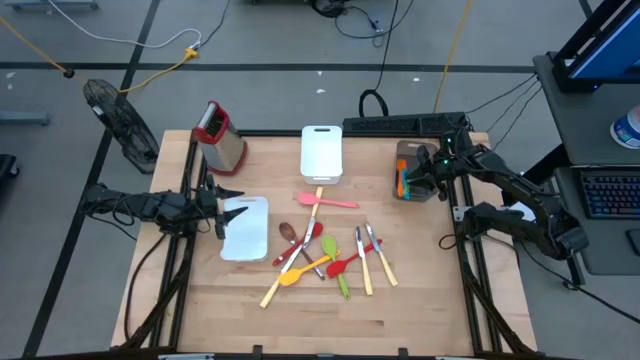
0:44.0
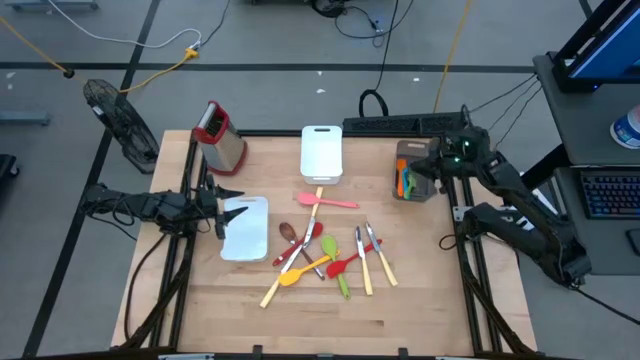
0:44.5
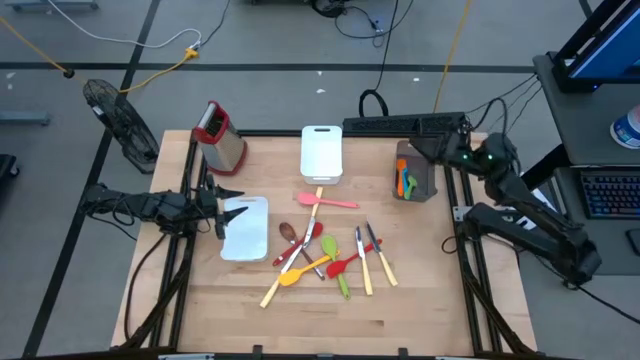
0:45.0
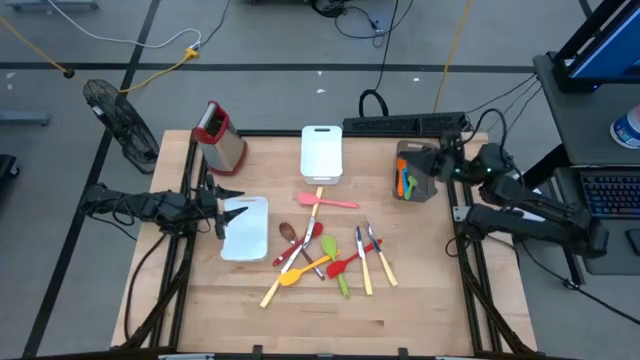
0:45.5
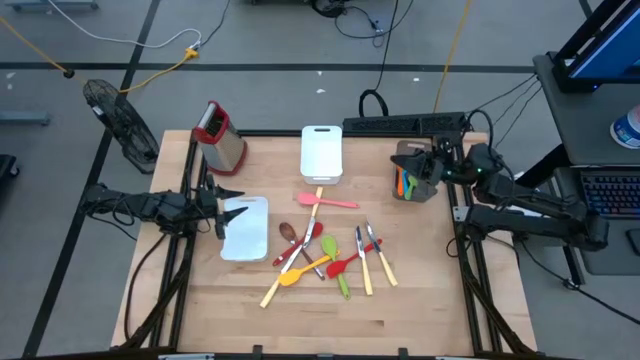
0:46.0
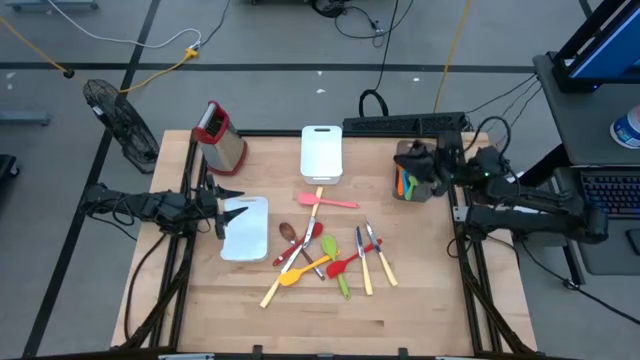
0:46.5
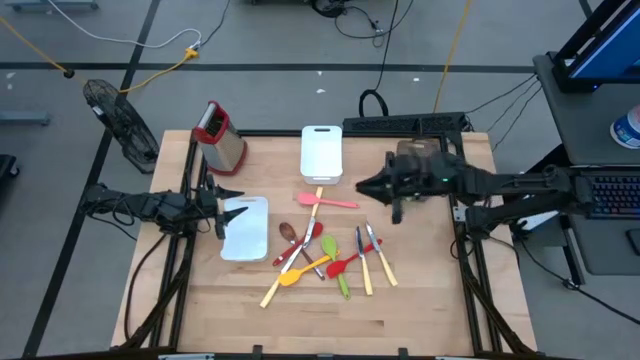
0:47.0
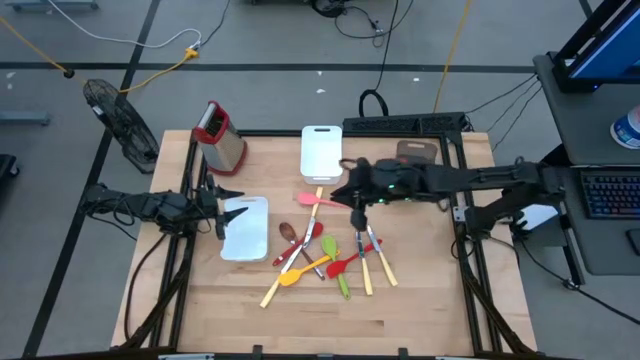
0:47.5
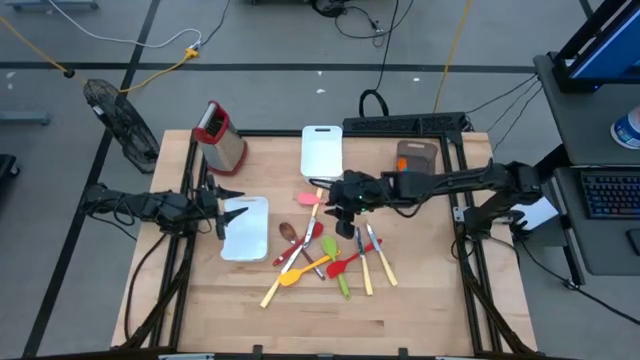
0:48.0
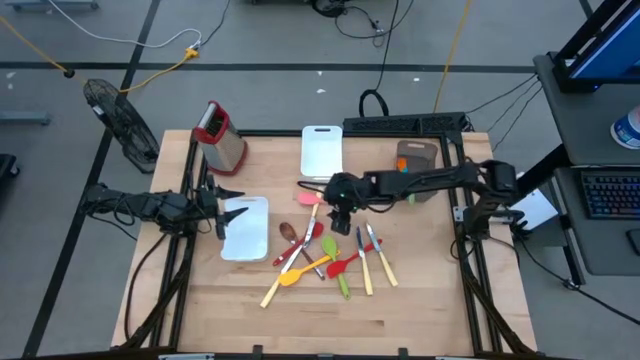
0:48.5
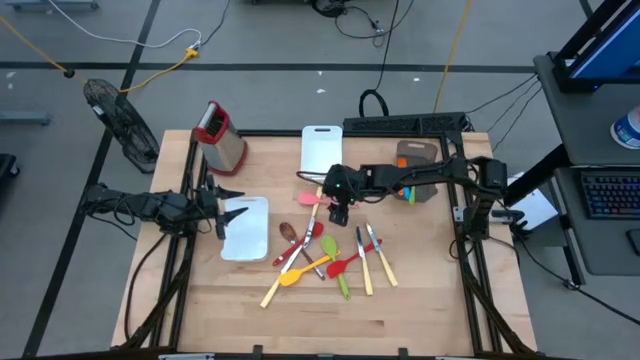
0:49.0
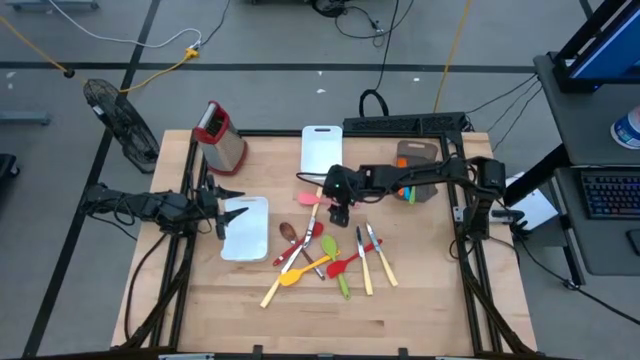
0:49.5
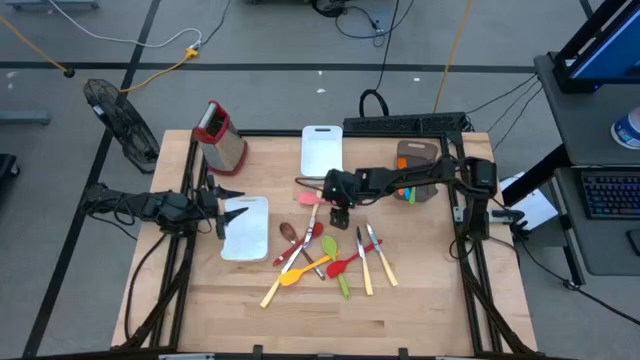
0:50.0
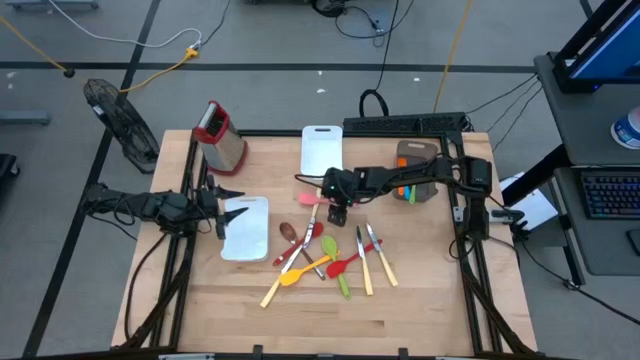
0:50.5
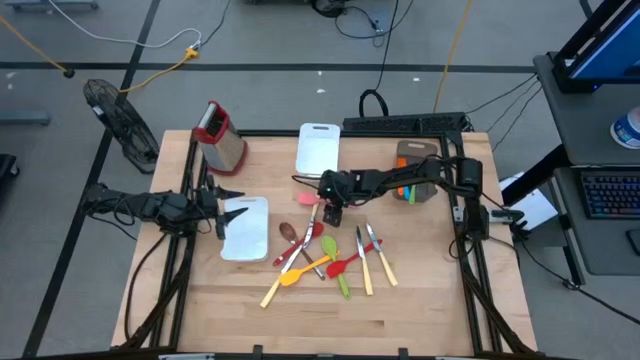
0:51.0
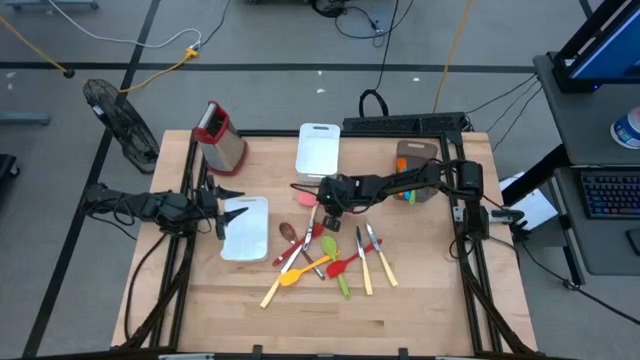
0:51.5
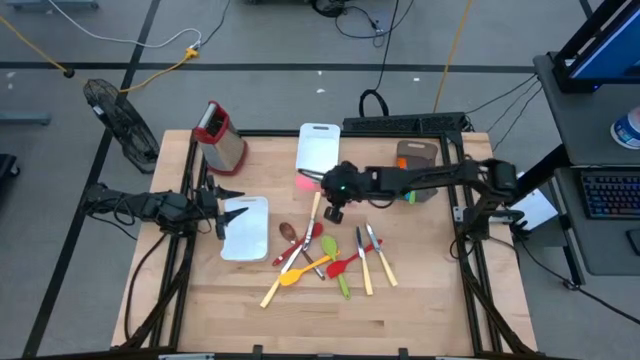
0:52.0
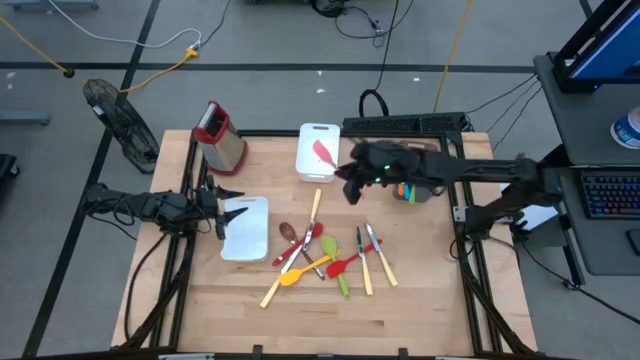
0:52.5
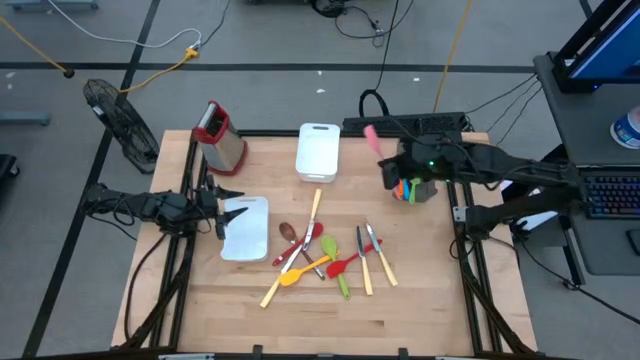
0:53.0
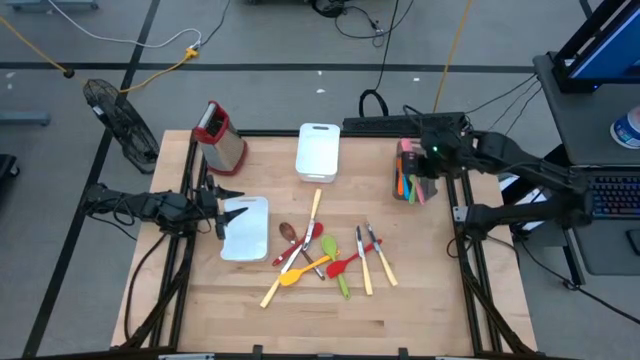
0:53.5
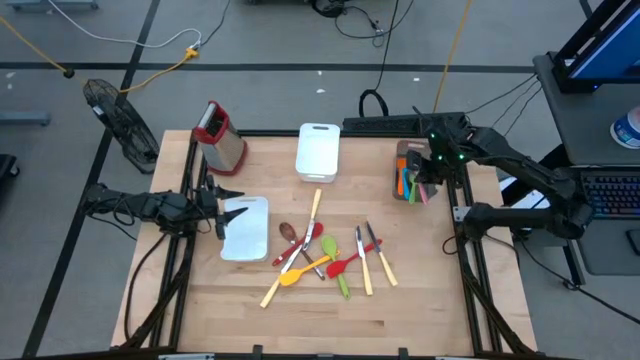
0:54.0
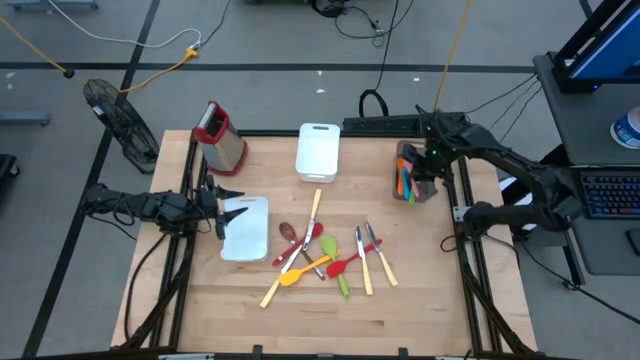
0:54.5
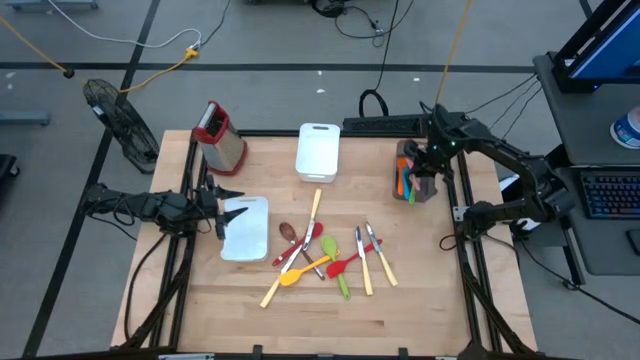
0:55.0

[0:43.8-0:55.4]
Task: Pick & Place Kitchen Items
Put the pink spatula into the black bin

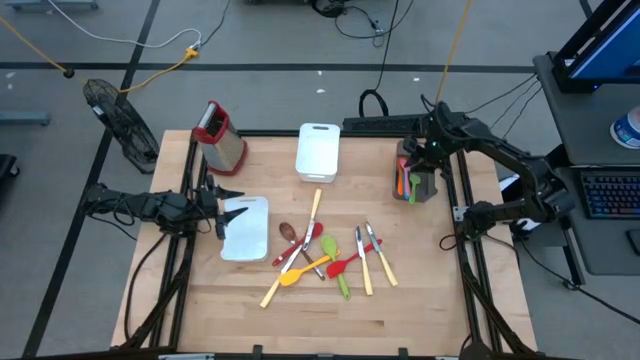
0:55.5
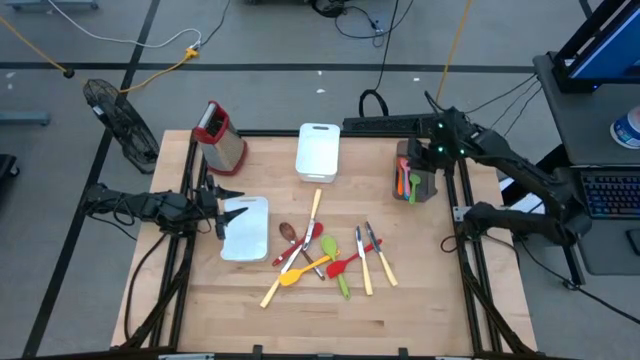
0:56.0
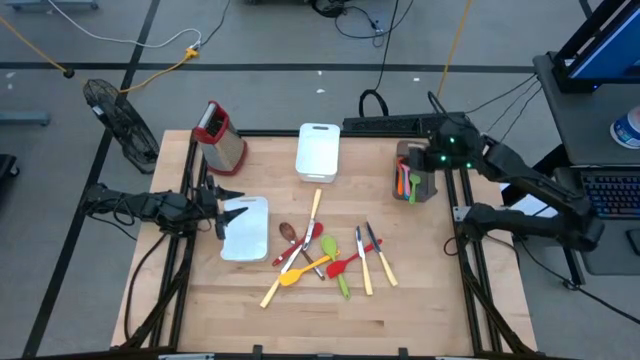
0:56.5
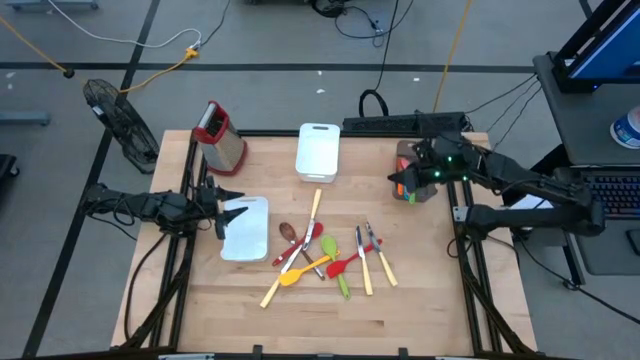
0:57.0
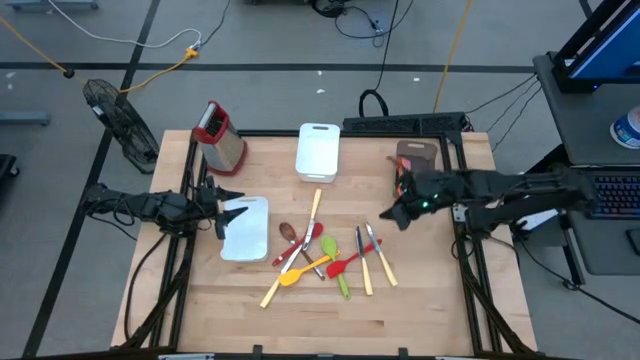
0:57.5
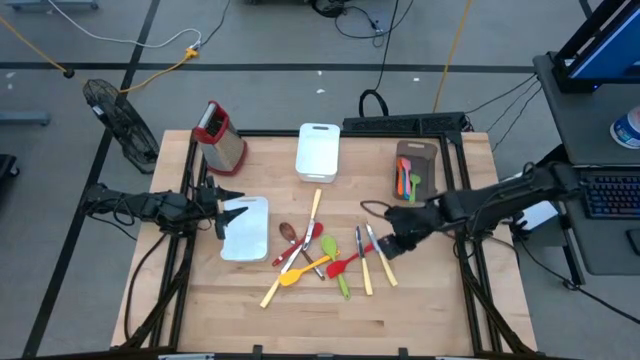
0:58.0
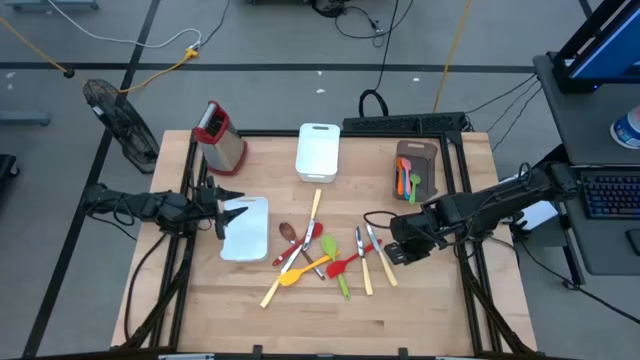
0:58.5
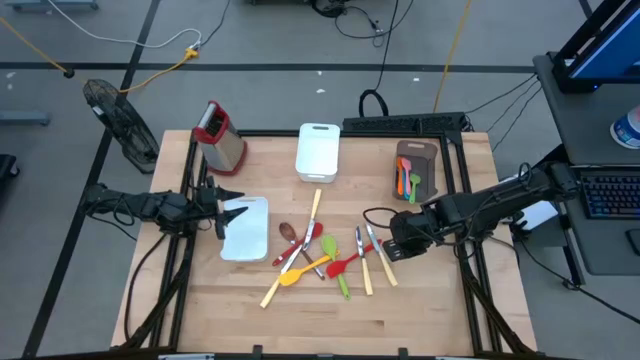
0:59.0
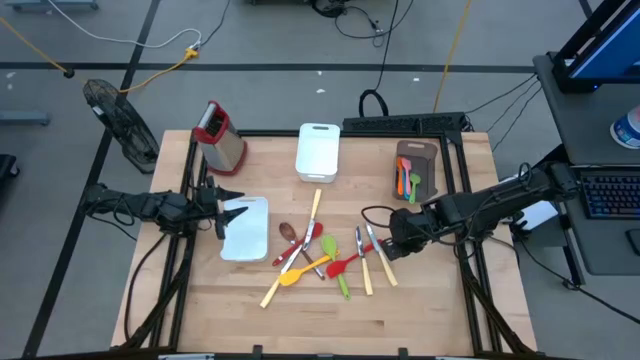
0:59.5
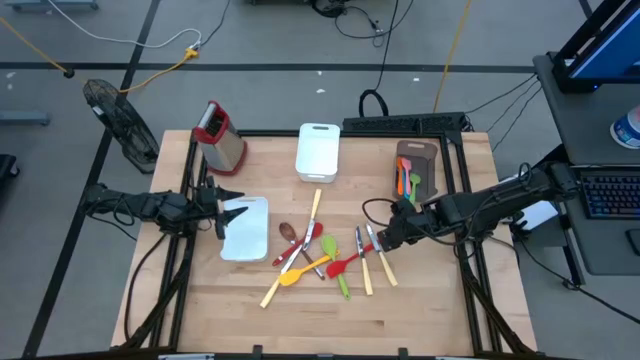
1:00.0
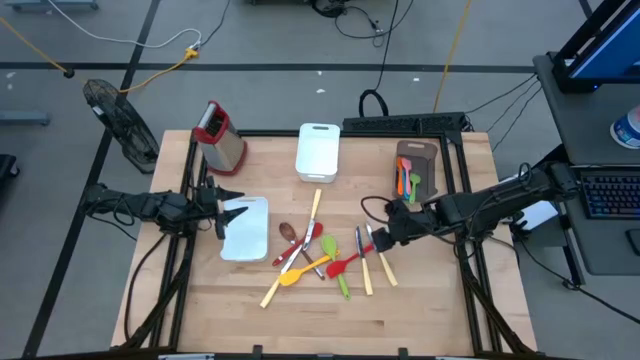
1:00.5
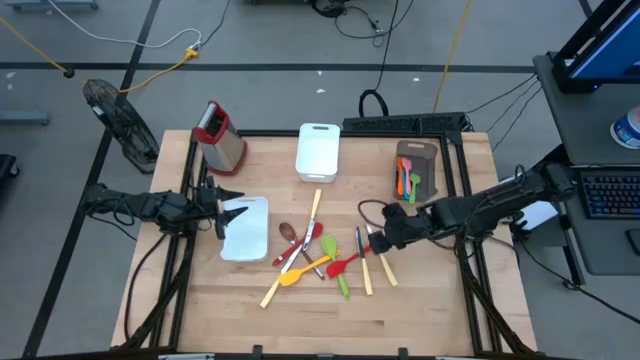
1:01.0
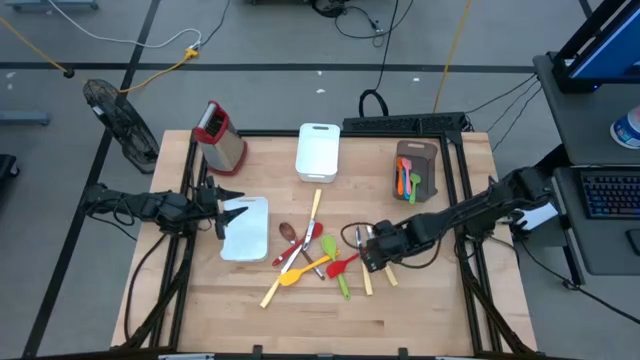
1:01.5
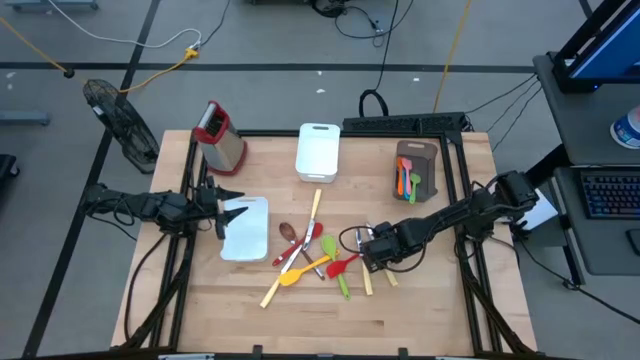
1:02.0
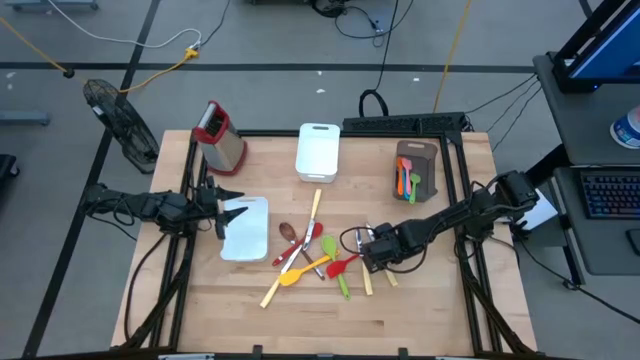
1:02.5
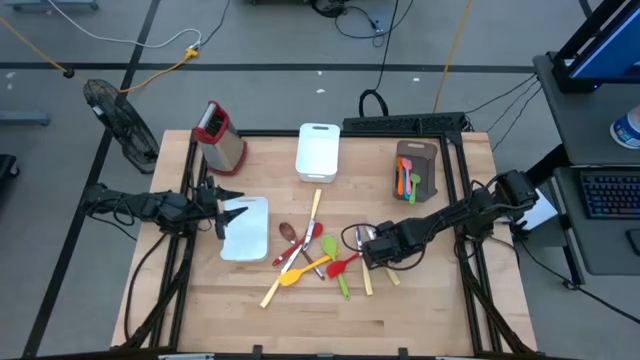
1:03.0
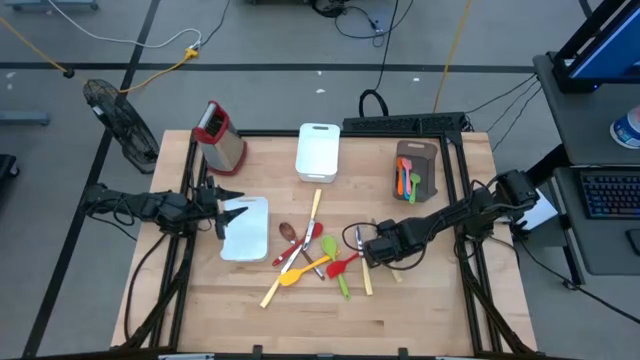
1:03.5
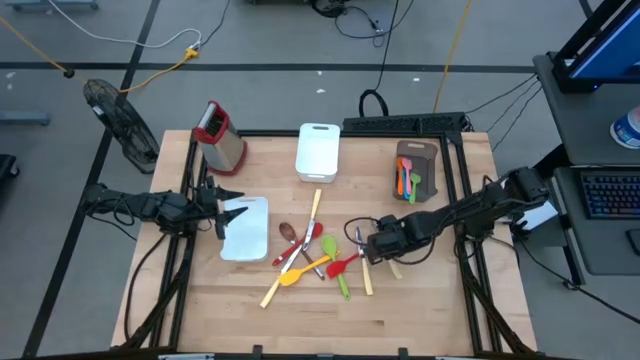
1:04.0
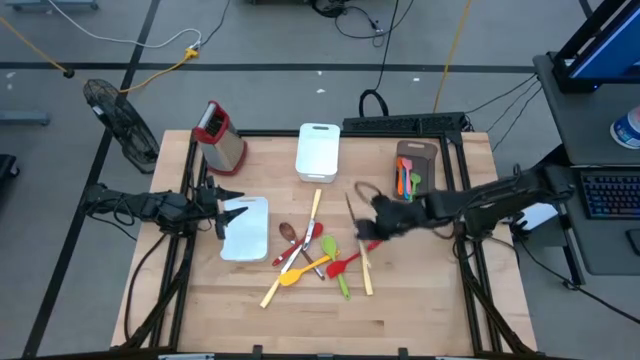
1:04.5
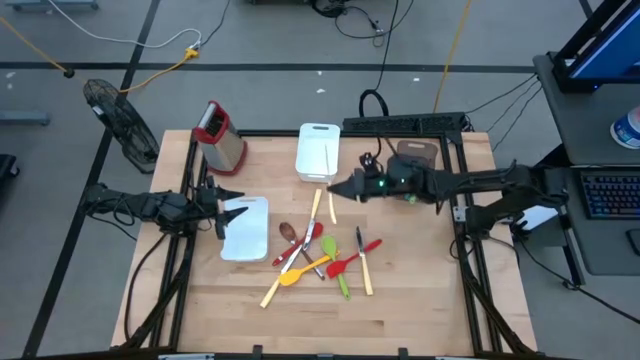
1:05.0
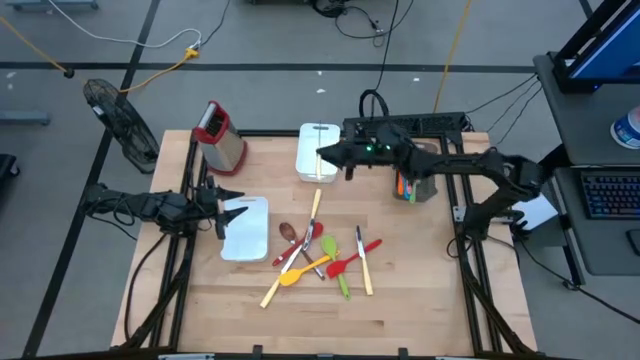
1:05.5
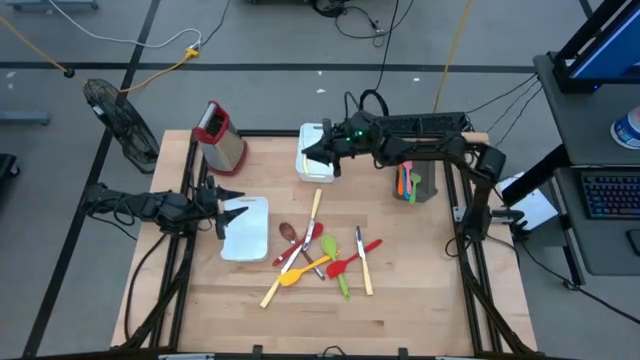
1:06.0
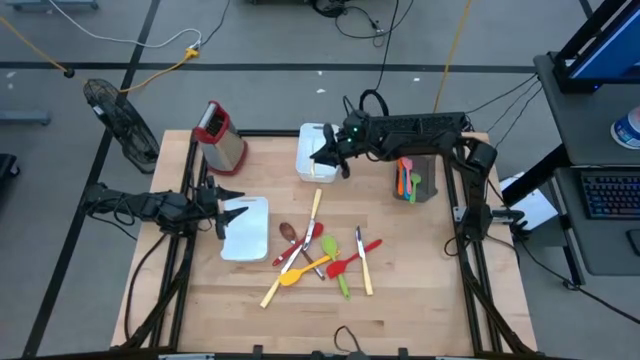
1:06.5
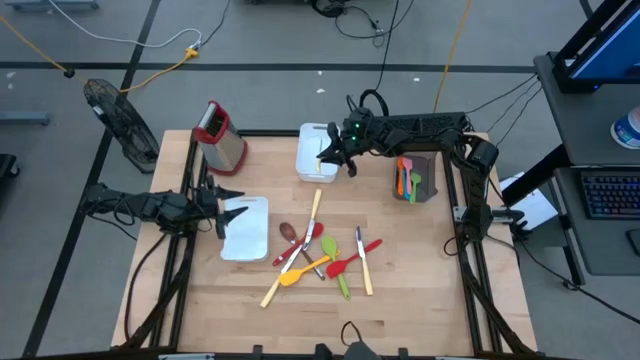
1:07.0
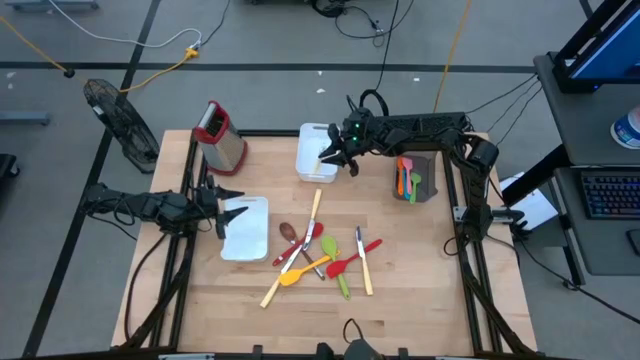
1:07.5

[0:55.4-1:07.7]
Put the yellow knife into the top white bin
